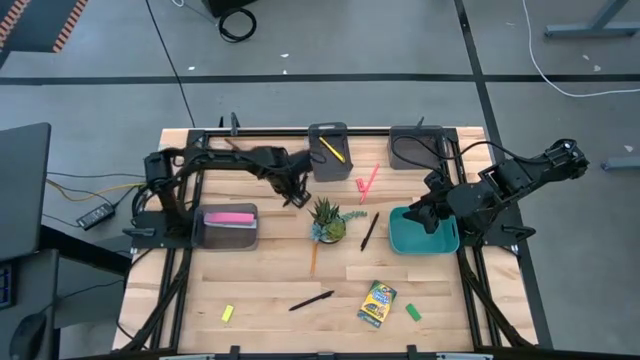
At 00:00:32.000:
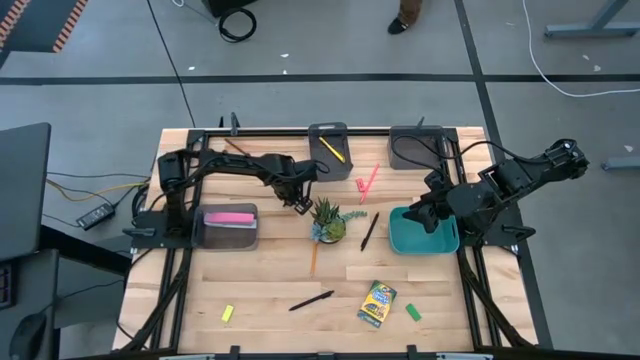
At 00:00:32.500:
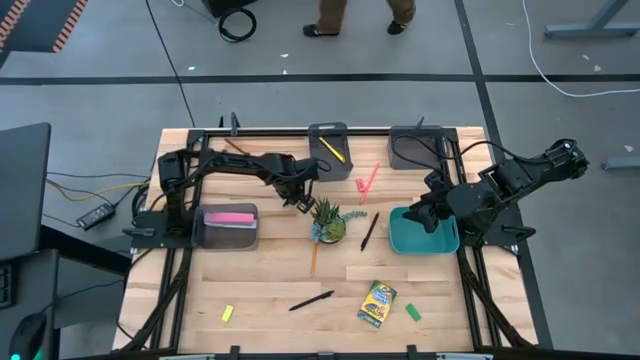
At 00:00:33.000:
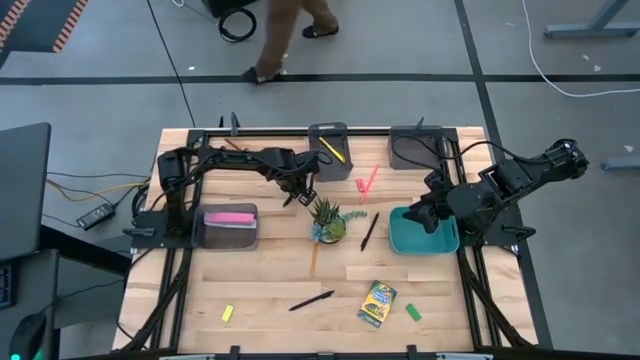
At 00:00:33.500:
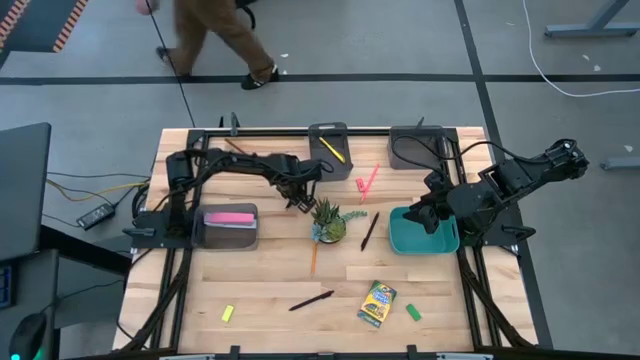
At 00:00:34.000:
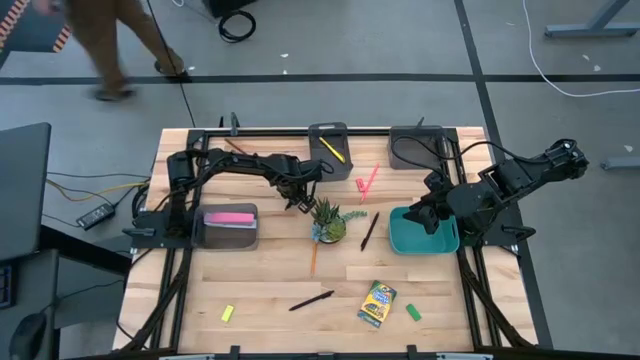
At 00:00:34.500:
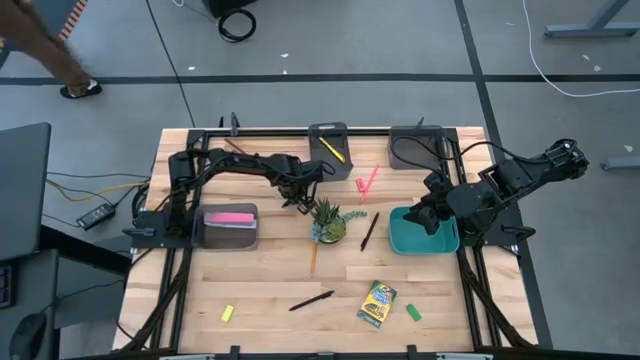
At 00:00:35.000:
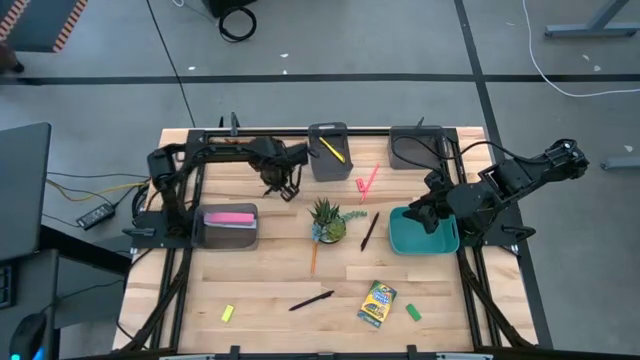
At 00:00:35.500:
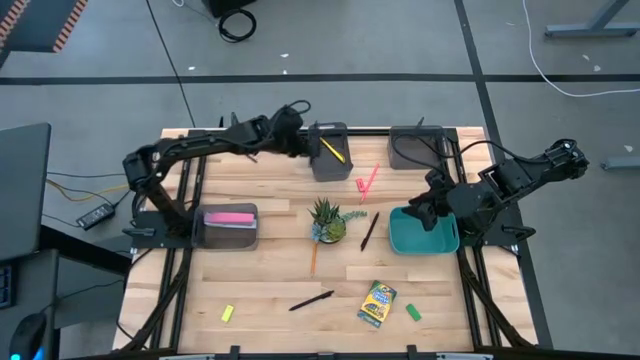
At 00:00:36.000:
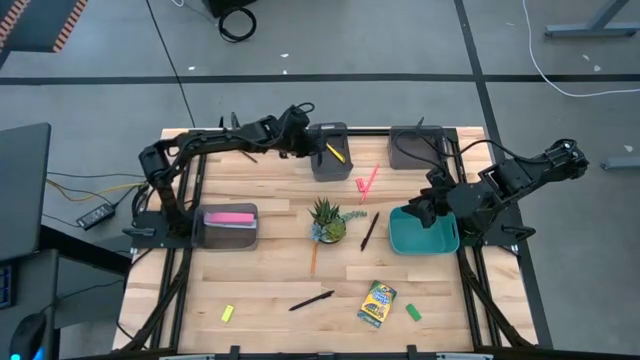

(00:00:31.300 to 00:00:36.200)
Task: Sort crayons/erasers/pens/pencils in bins
Put the left black pen into the top center black bin

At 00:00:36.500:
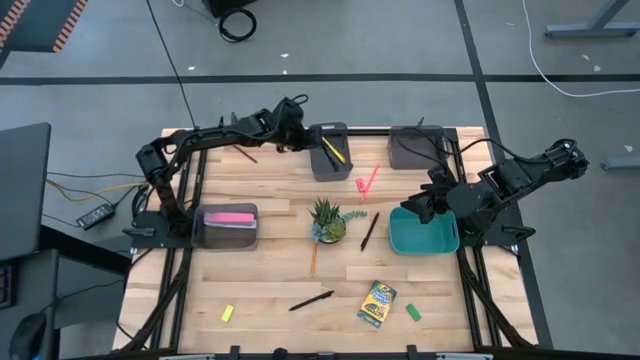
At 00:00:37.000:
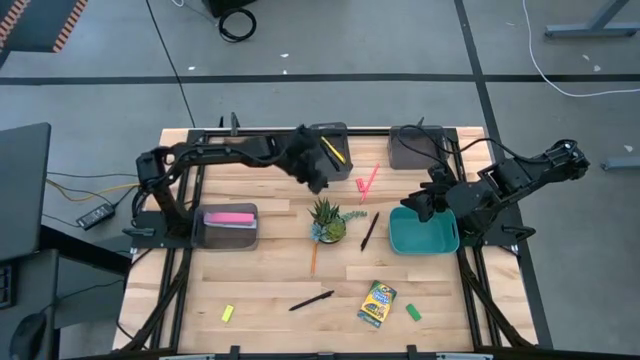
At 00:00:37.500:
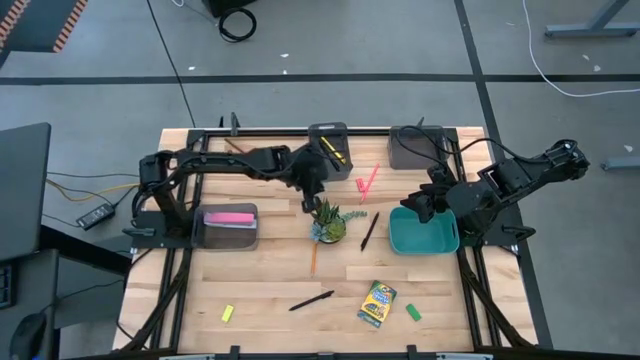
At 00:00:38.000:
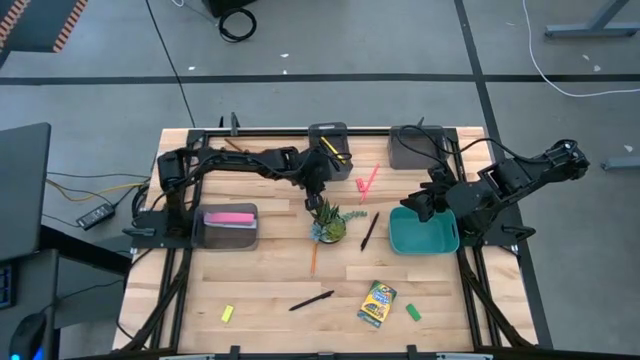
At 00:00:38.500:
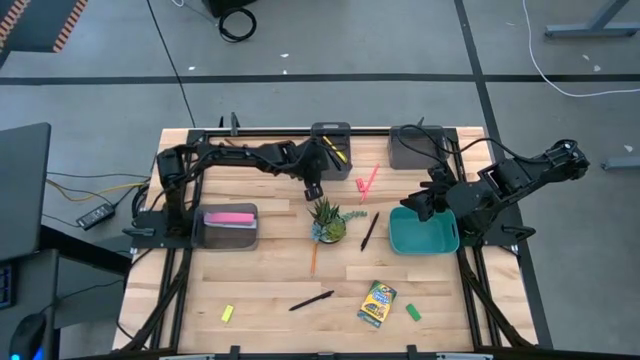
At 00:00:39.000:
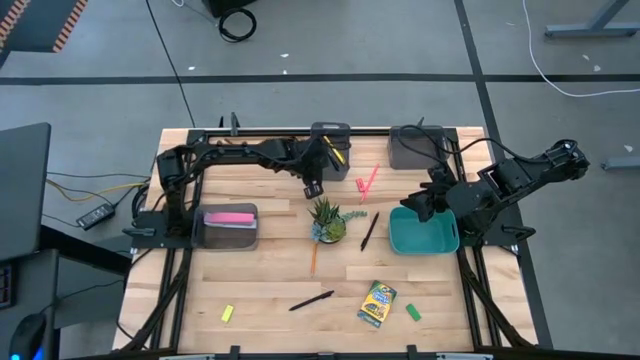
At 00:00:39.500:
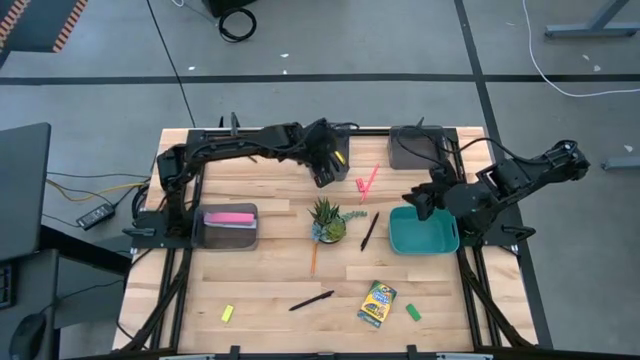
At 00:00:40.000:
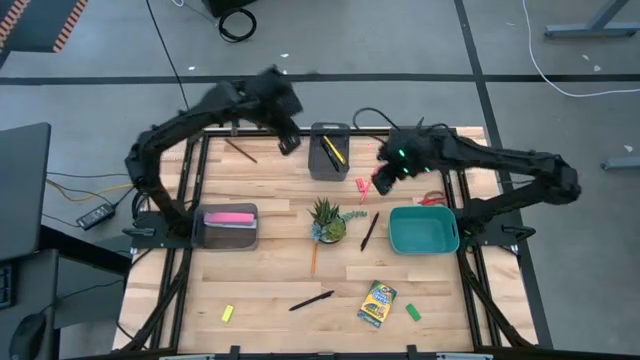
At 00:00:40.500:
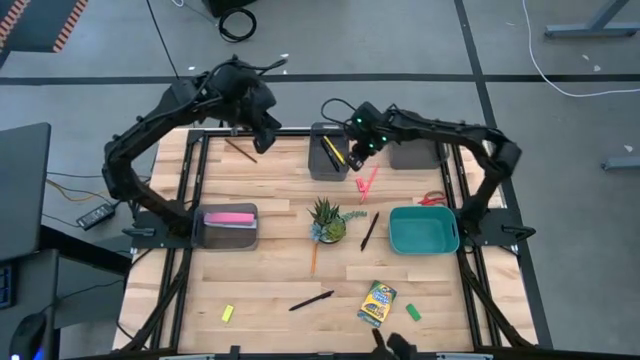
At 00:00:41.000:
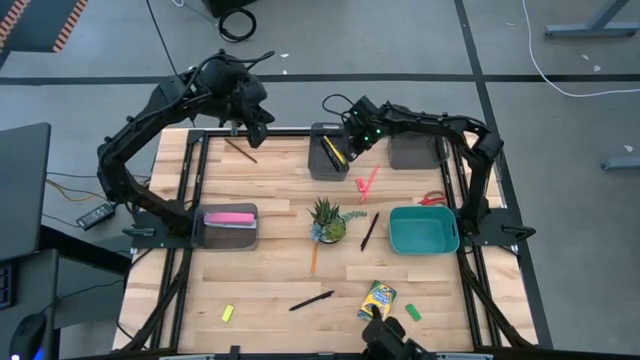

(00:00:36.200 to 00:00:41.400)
Adjust the middle black bin

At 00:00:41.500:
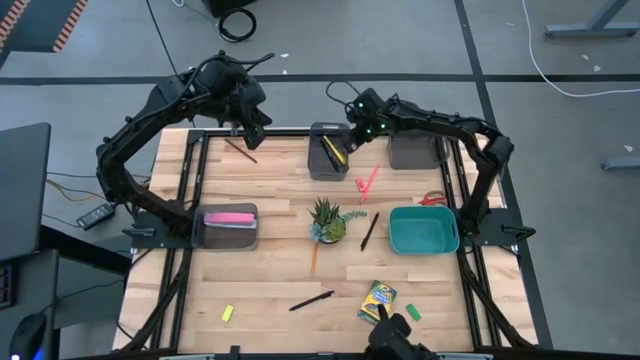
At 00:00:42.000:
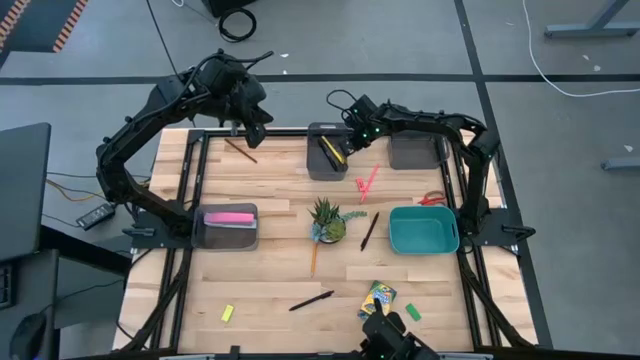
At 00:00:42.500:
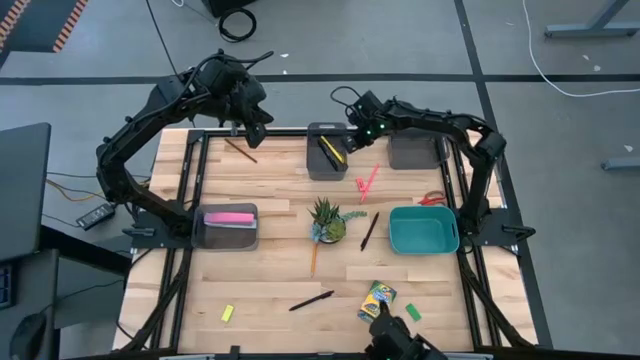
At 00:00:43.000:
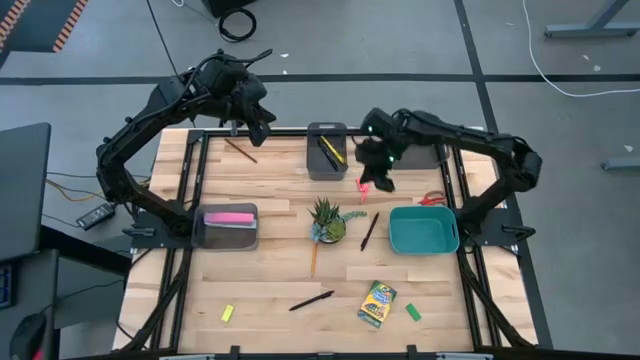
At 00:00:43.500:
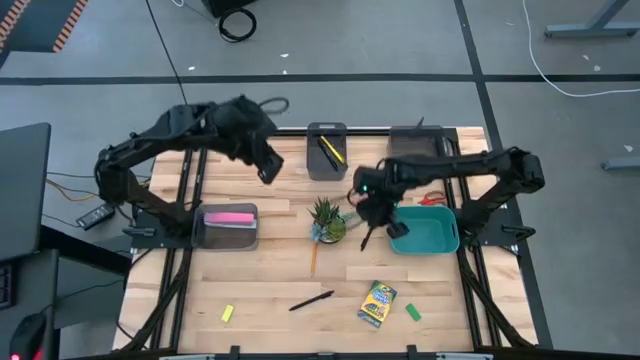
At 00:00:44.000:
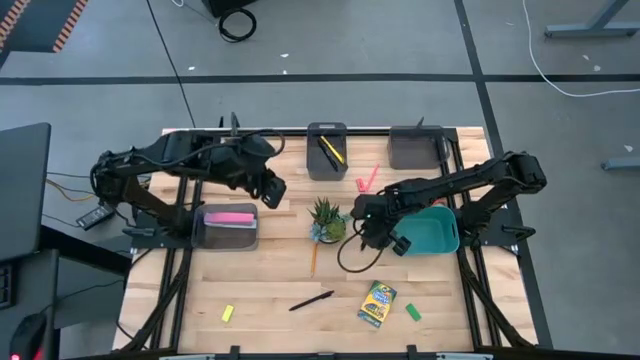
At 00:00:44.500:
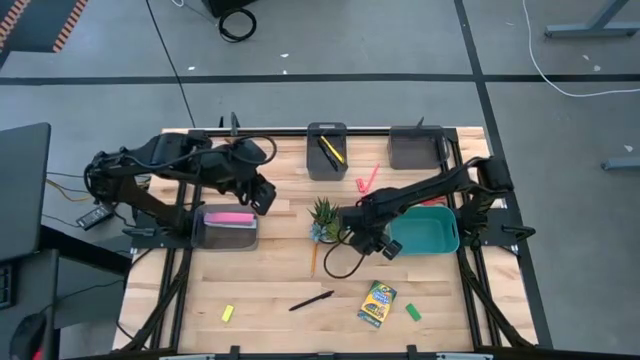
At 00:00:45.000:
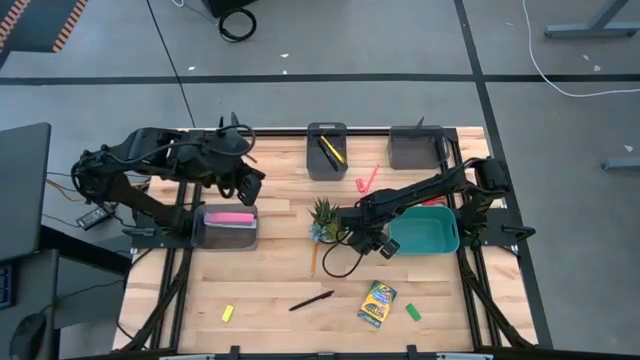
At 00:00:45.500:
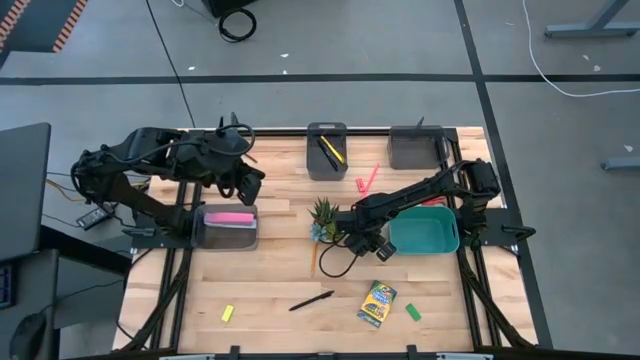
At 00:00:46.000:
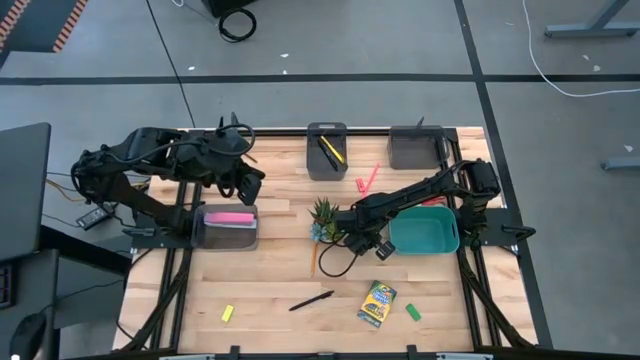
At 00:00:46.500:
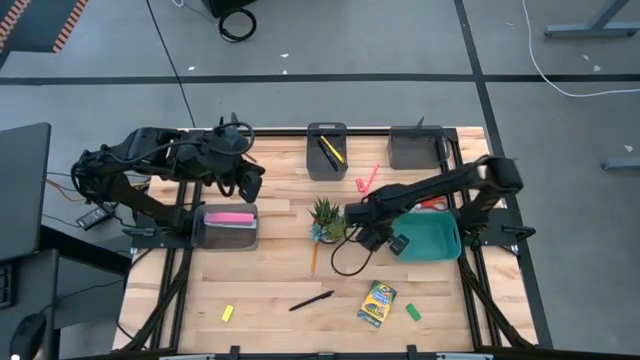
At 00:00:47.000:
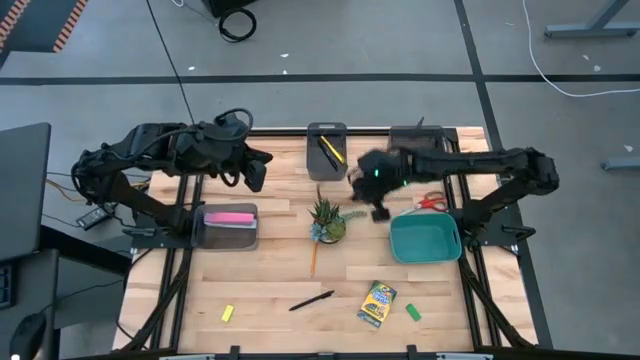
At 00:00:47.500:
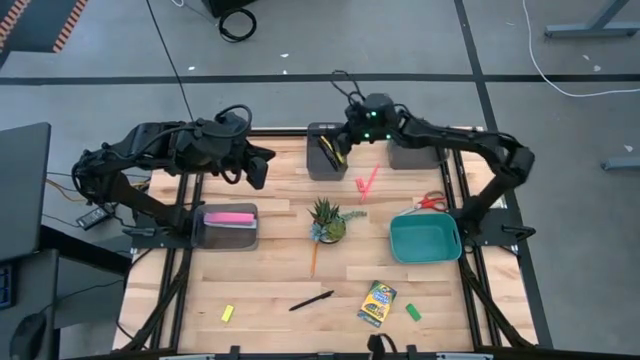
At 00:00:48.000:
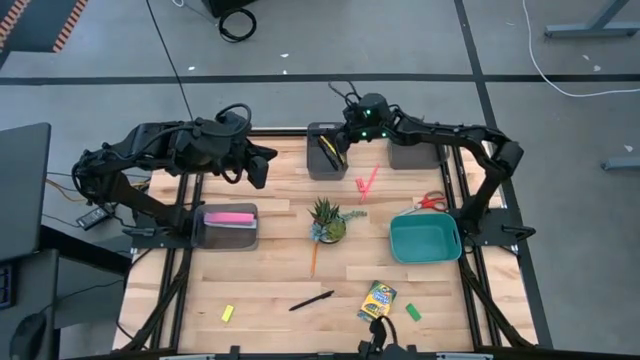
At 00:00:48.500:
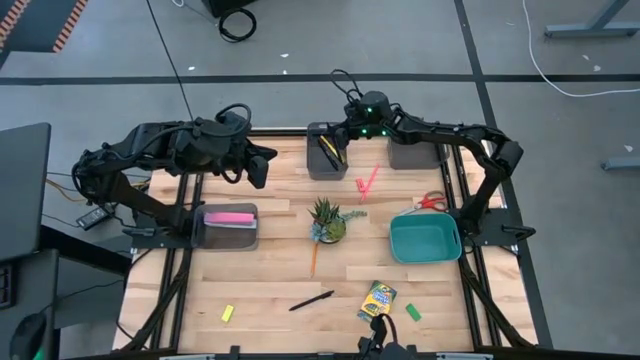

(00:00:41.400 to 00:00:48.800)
Put the top black pen into the left black bin

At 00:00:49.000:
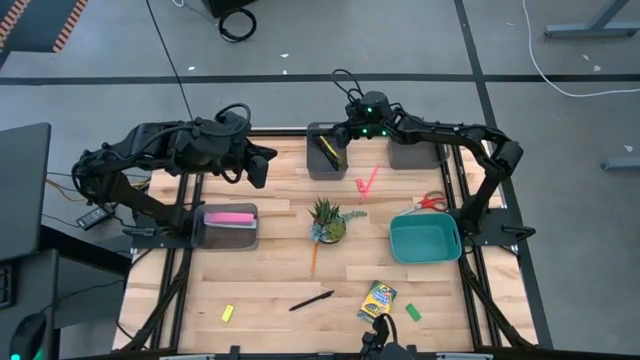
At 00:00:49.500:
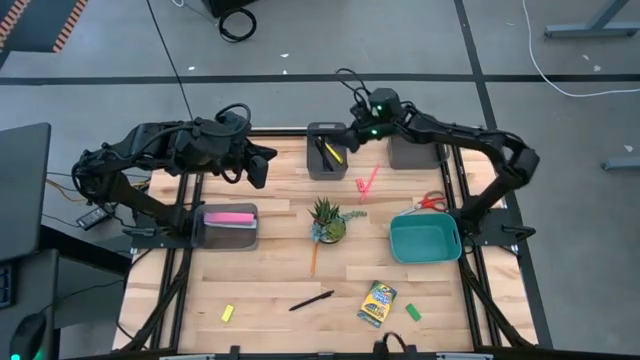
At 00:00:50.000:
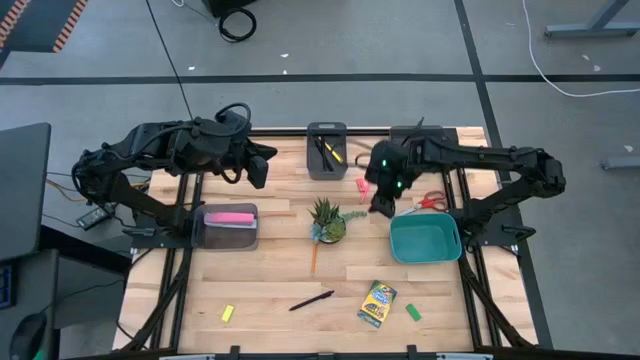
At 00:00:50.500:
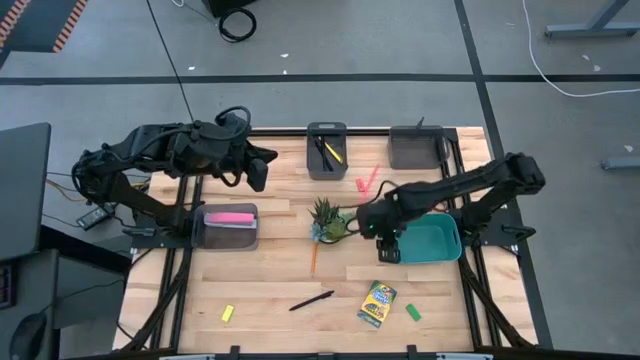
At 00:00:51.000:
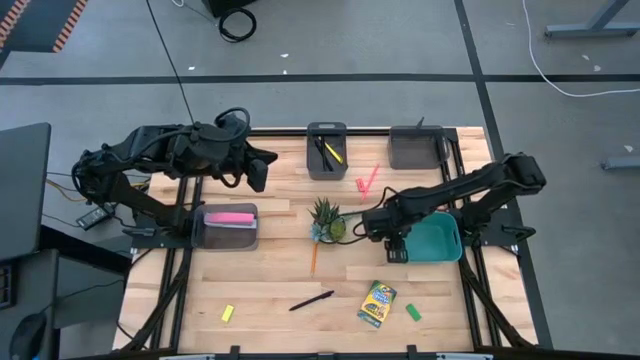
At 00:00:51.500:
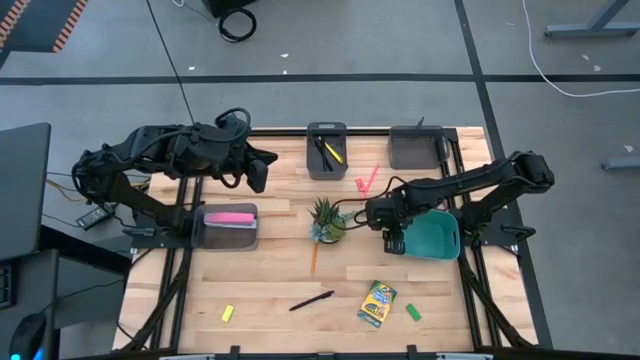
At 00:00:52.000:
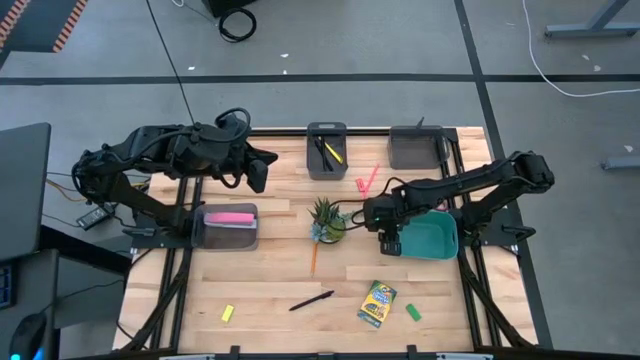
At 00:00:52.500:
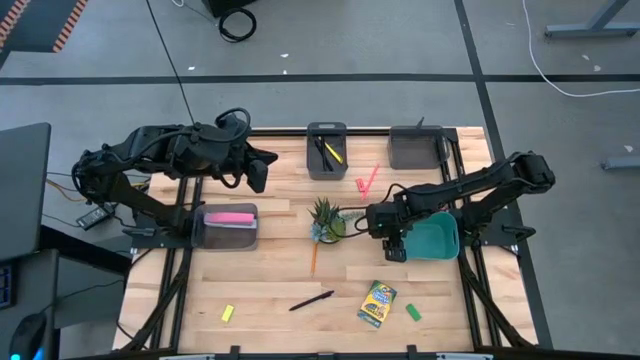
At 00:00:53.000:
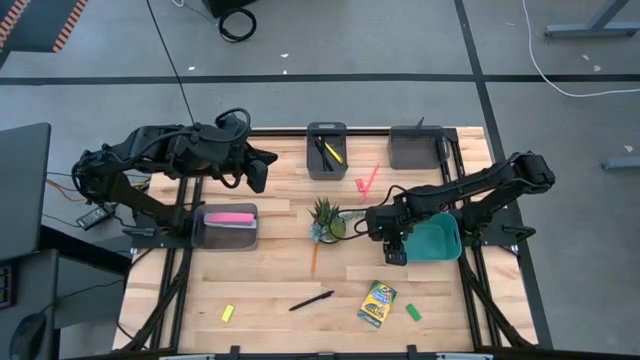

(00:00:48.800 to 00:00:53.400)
Adjust the green blue bin
